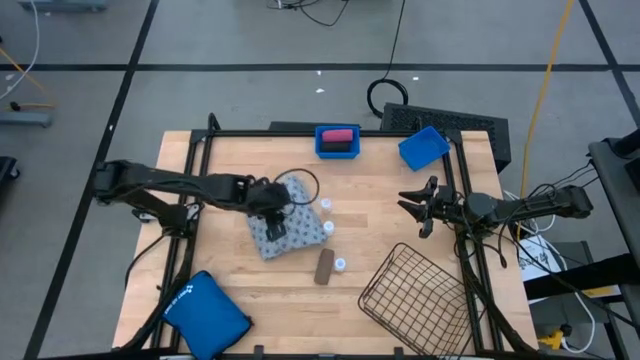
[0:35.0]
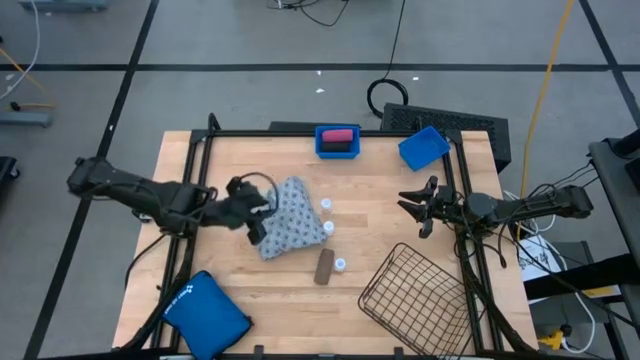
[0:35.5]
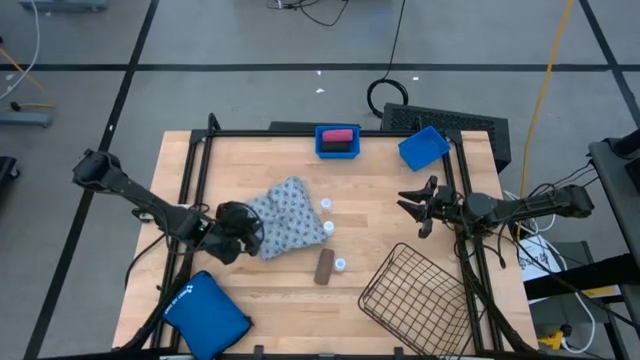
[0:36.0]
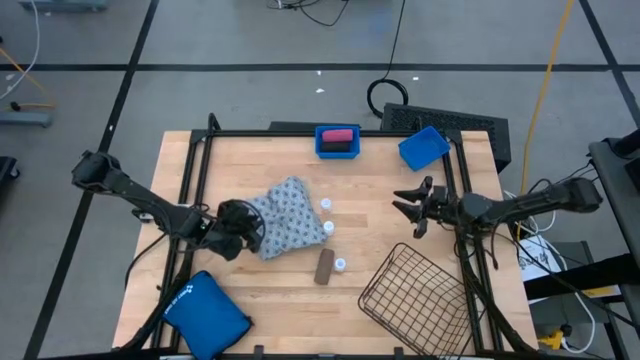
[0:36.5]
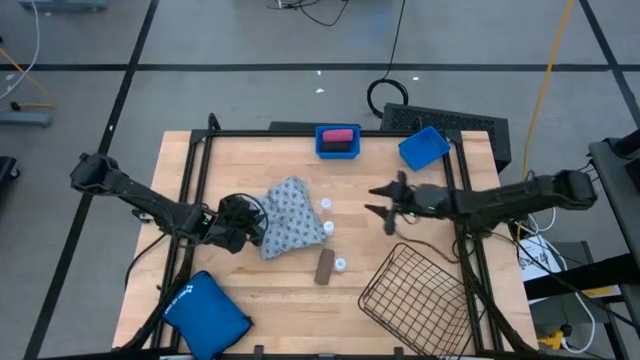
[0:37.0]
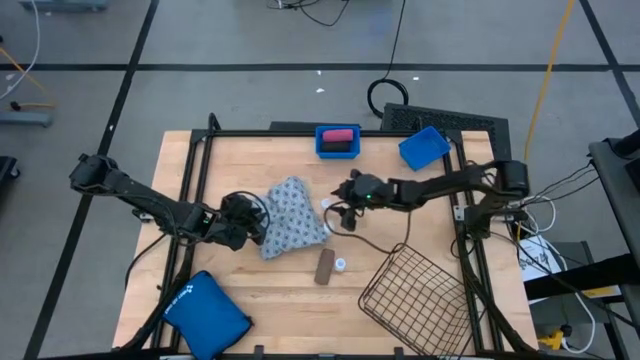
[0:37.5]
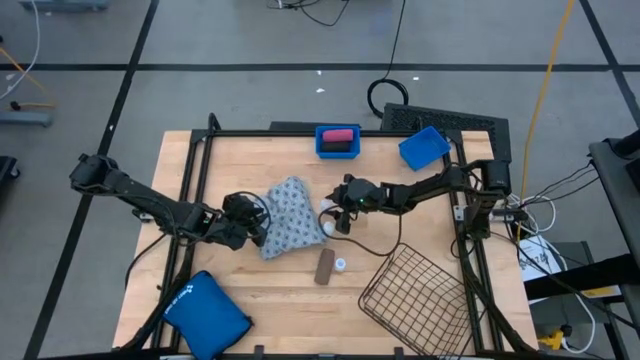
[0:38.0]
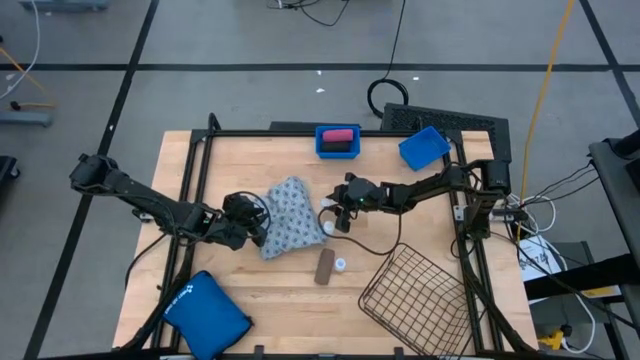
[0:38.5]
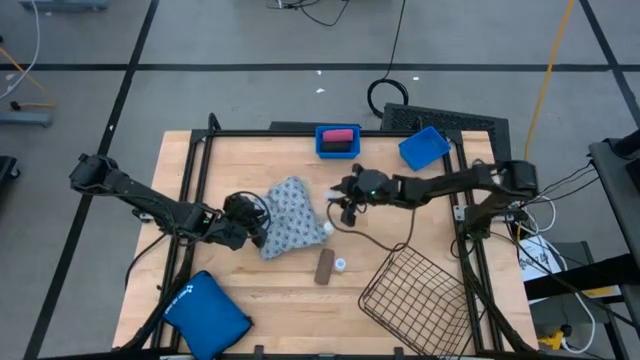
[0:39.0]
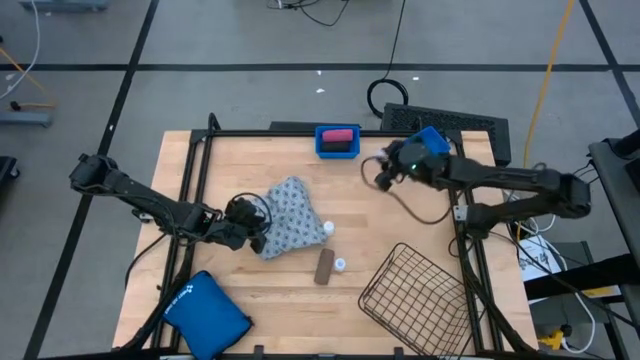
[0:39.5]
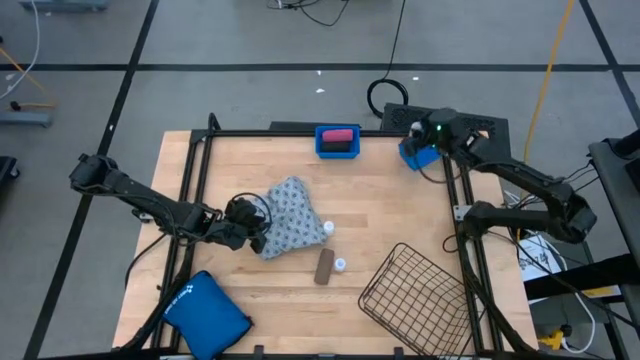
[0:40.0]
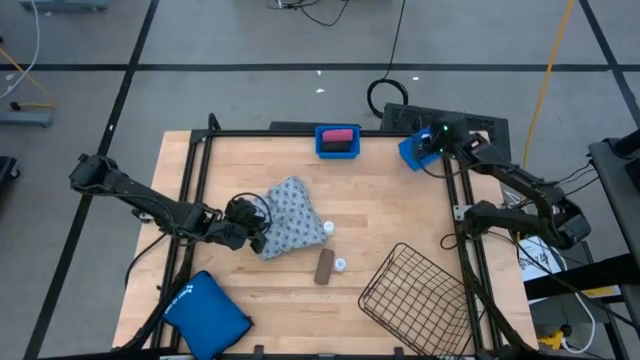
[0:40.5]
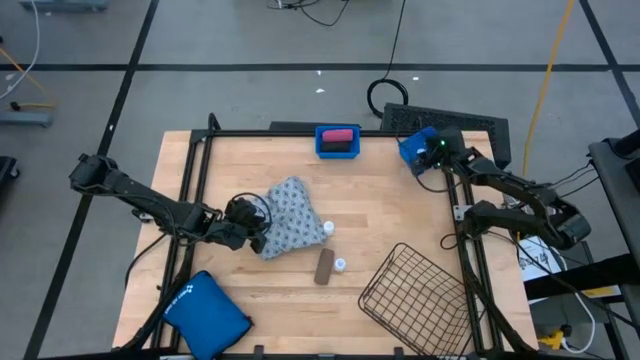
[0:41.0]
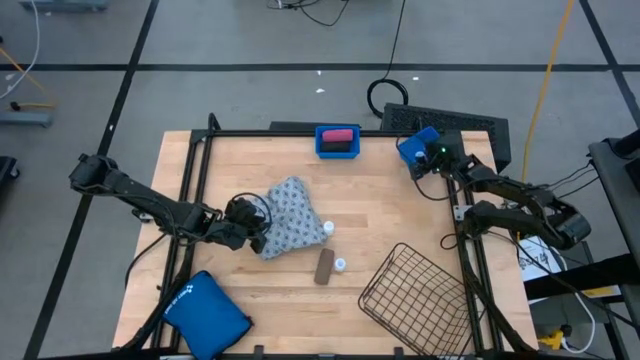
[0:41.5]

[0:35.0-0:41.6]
Task: Pick & Place Medicine items
Put the top white medicine bottle into the right blue bin

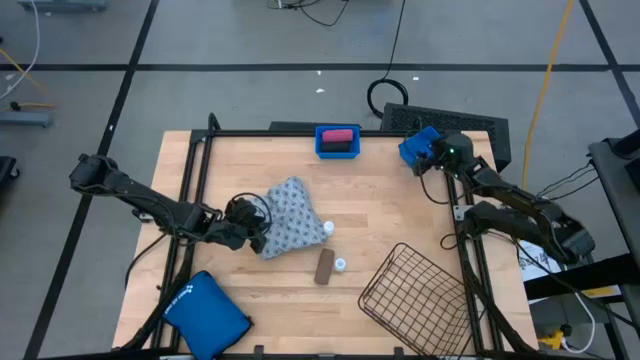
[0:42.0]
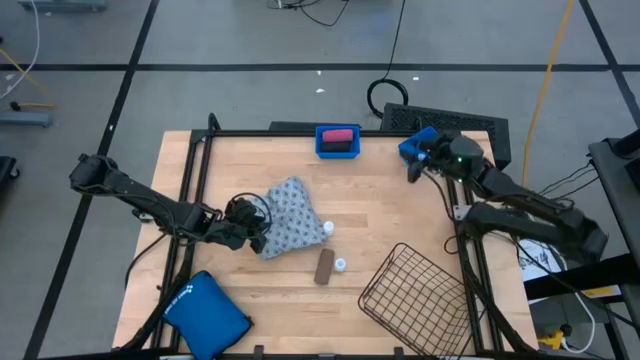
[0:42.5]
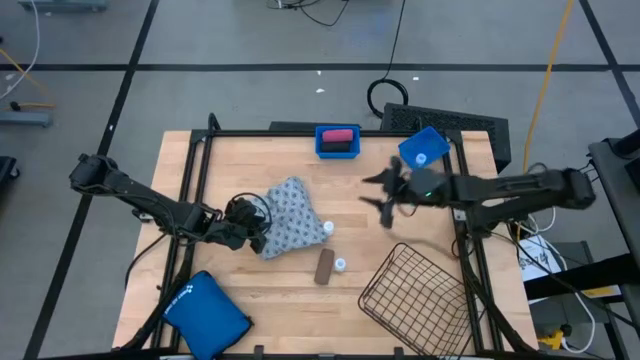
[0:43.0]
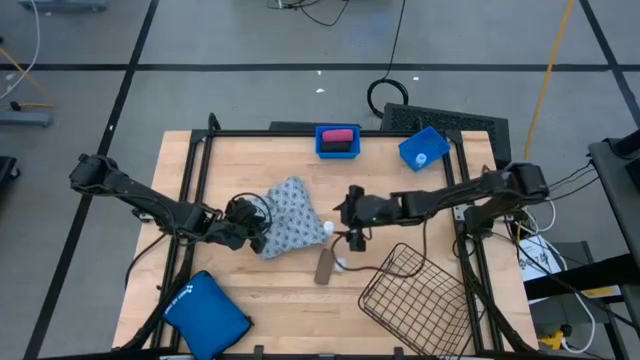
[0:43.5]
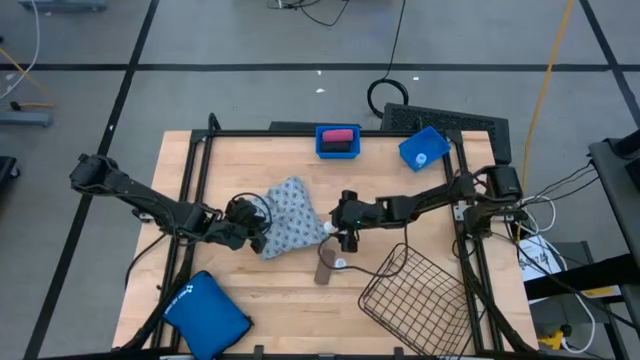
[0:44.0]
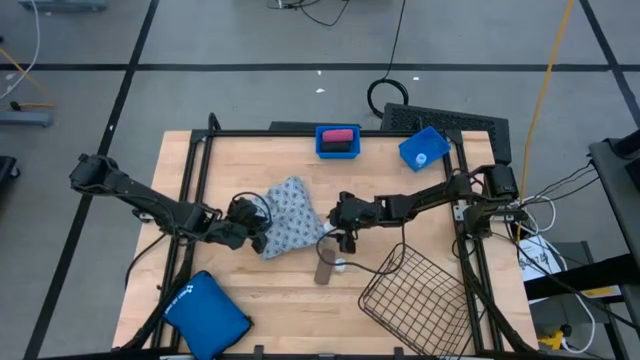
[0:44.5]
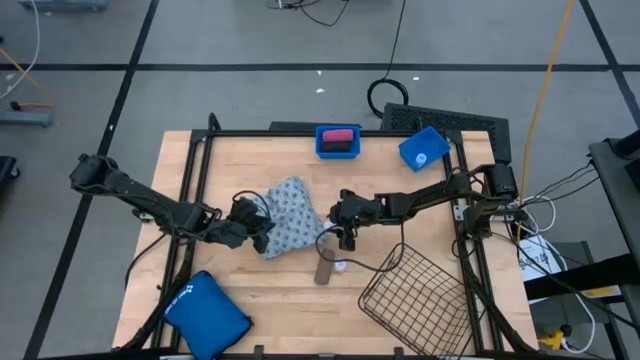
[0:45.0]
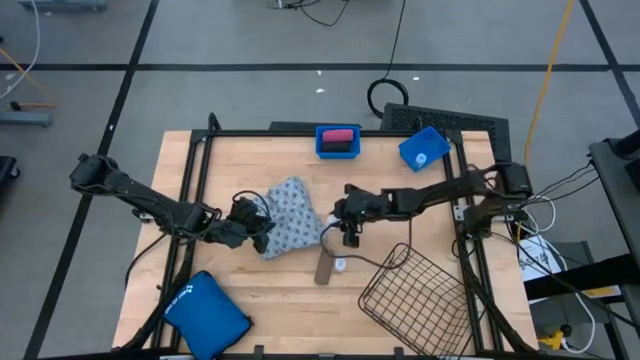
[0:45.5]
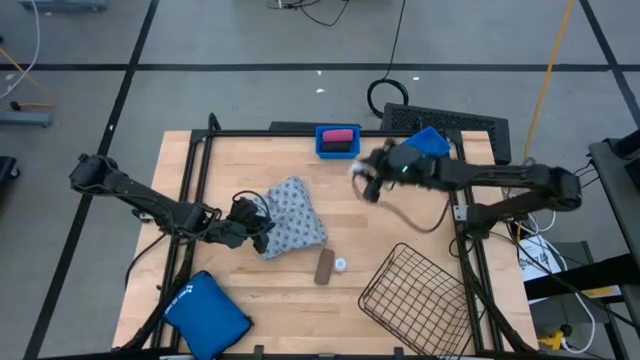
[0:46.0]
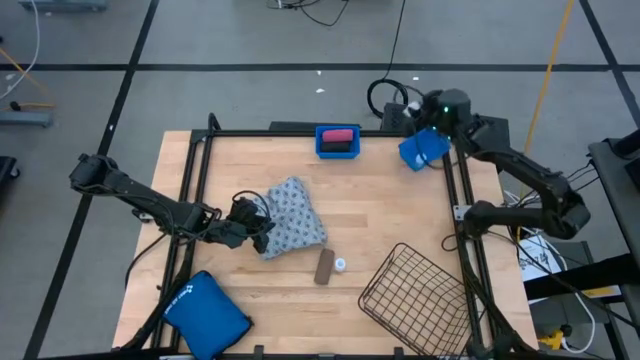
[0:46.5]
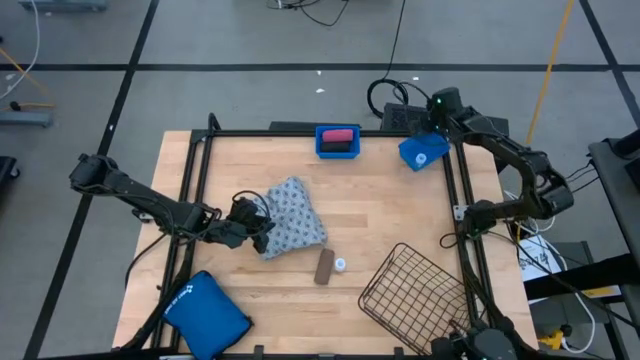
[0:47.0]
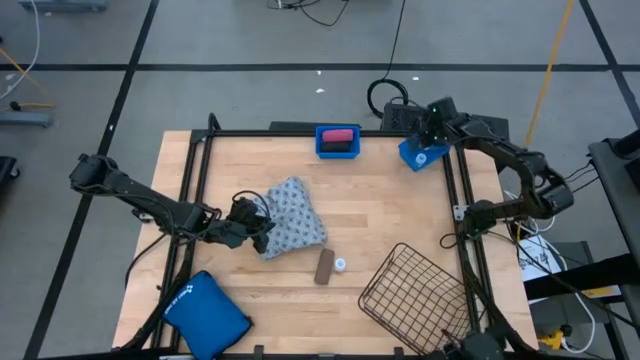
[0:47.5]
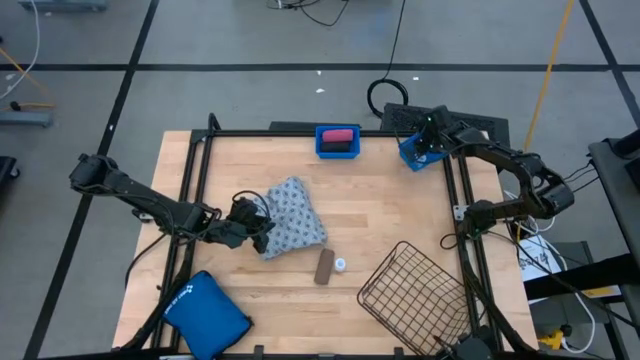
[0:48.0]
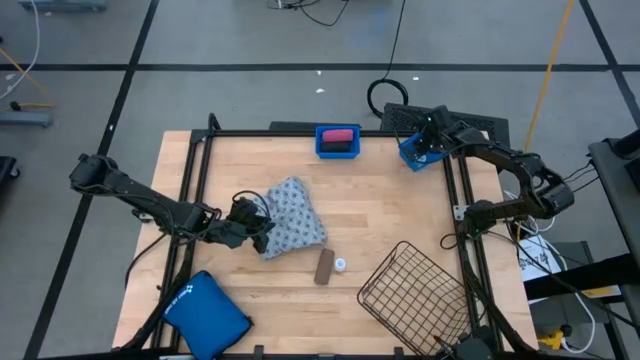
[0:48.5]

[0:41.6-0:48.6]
Put the top white medicine bottle into the right blue bin

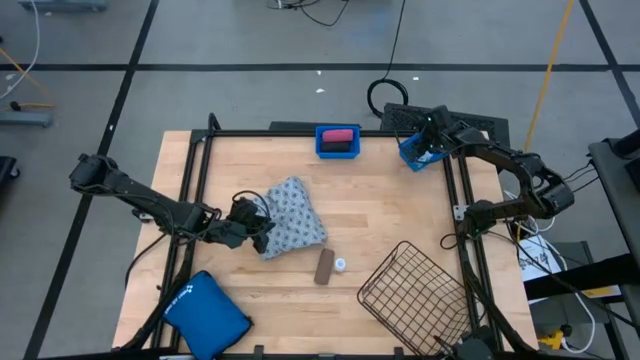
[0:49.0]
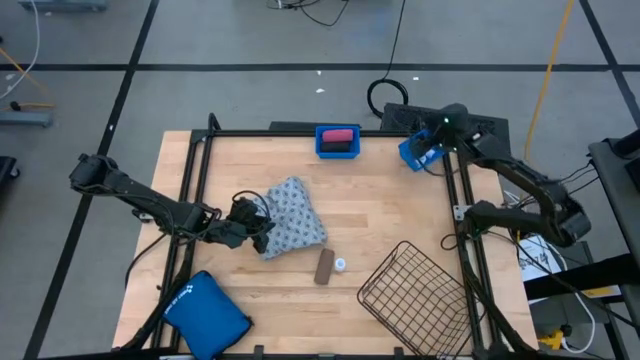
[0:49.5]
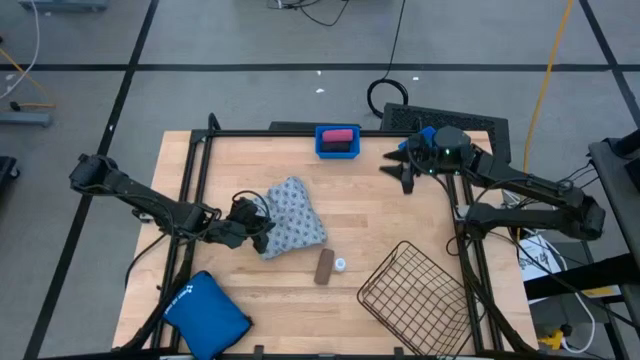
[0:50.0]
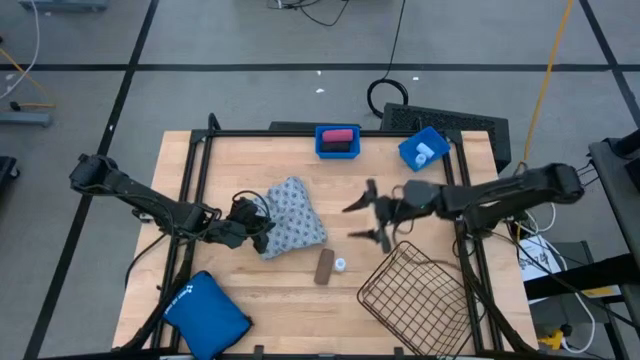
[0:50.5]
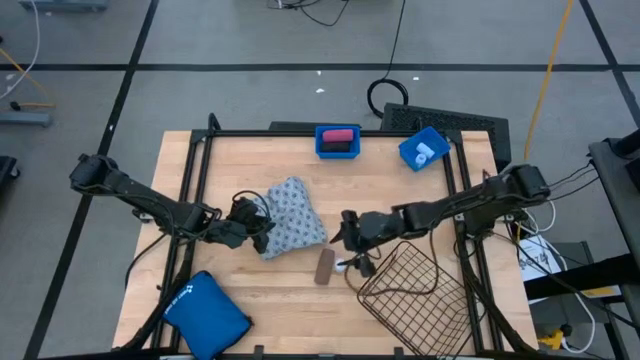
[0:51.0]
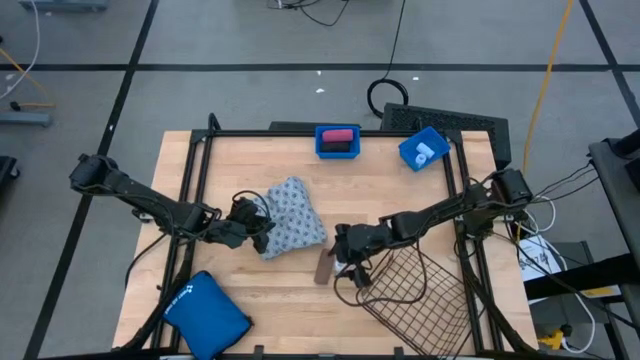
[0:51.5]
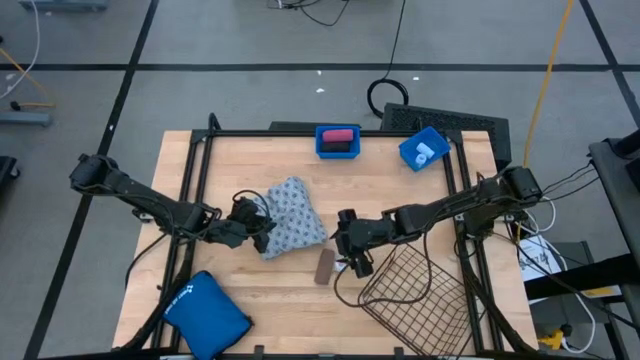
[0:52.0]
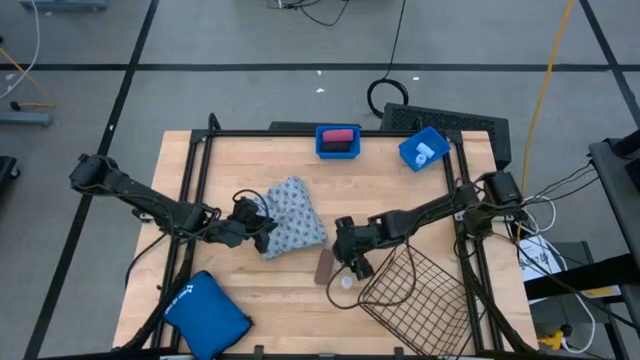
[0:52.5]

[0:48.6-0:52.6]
Put the white medicine bottle into the right blue bin

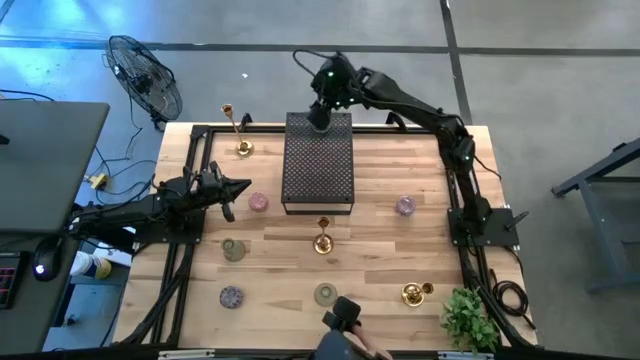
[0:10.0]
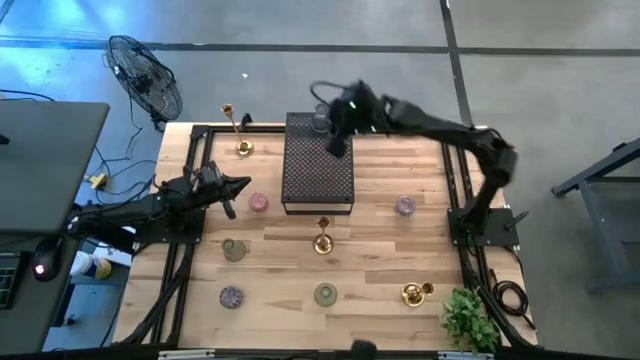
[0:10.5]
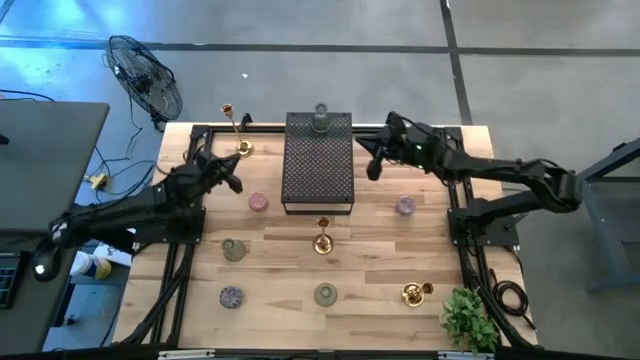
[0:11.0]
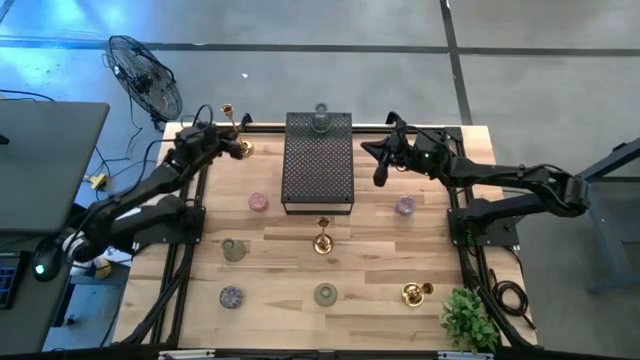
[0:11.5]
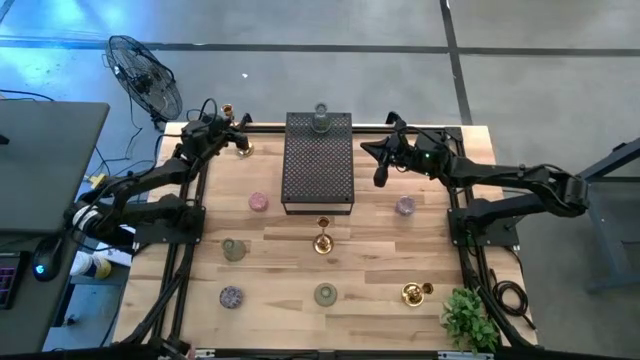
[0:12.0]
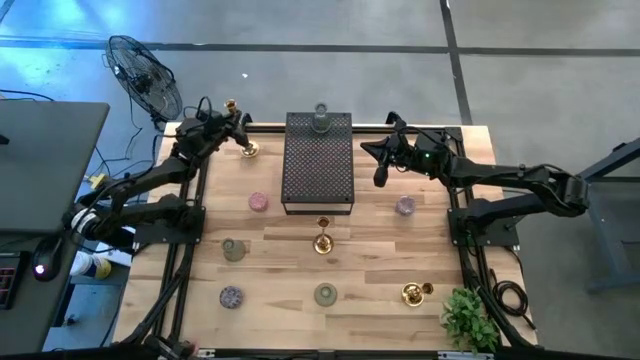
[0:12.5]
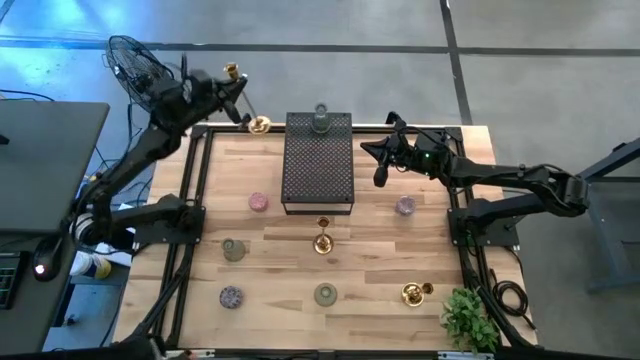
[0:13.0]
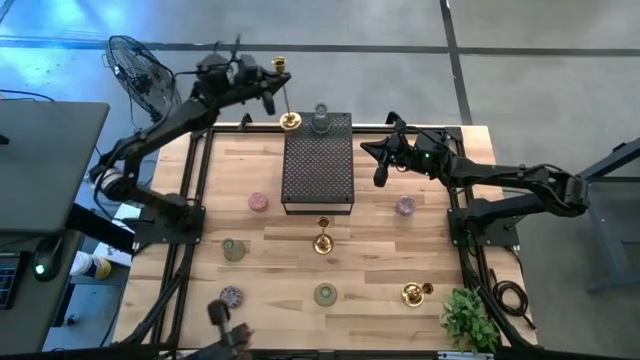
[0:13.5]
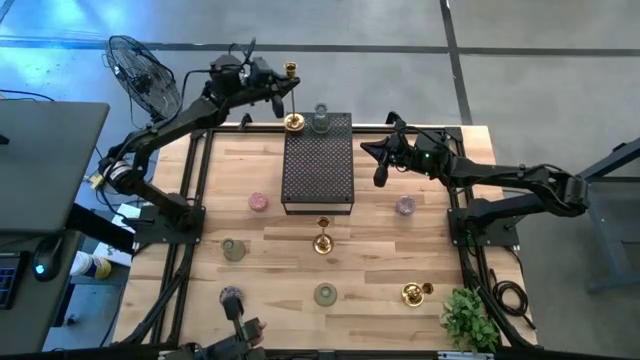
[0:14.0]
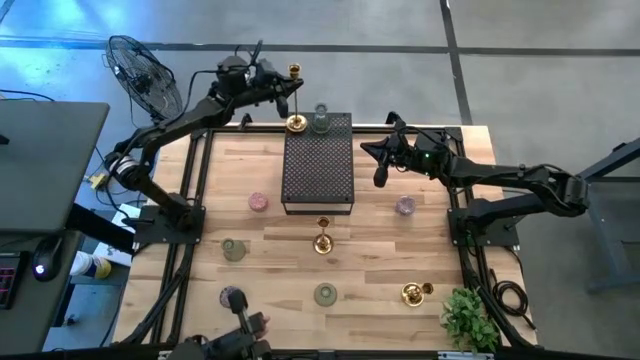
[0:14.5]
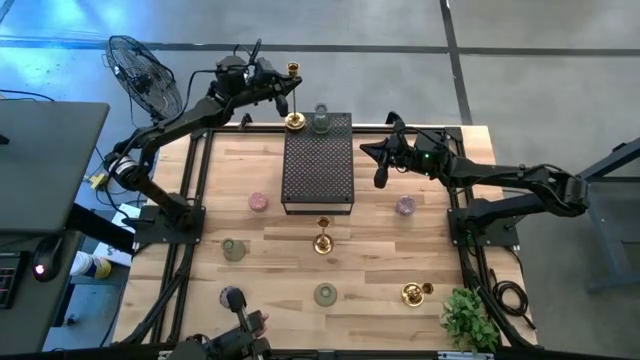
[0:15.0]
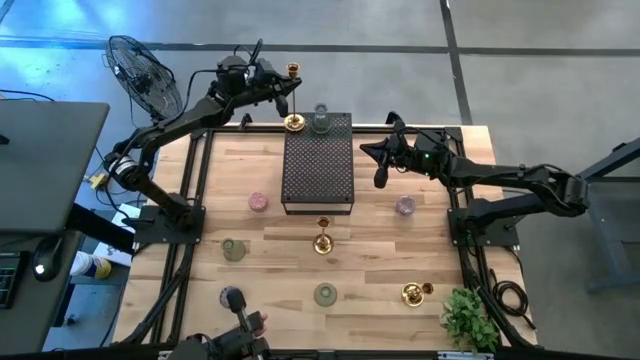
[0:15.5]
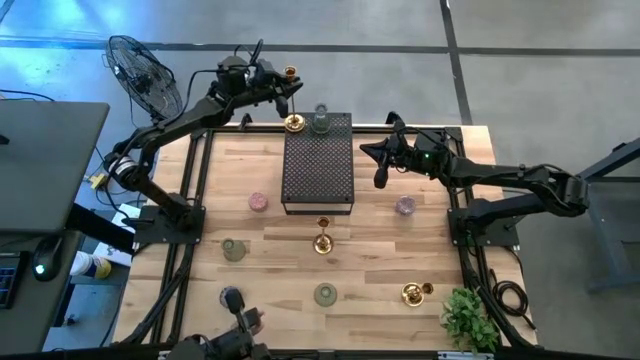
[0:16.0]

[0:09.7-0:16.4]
Task: Pick & Place candle stick holders
Put the top gold candle holder on the shelf
